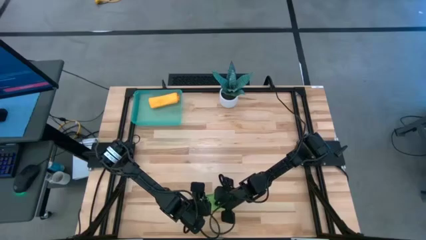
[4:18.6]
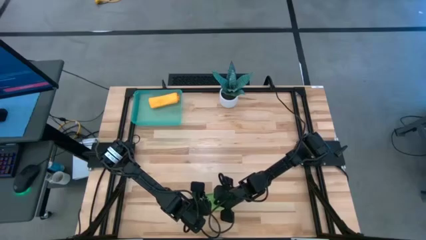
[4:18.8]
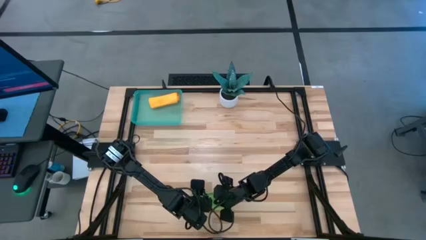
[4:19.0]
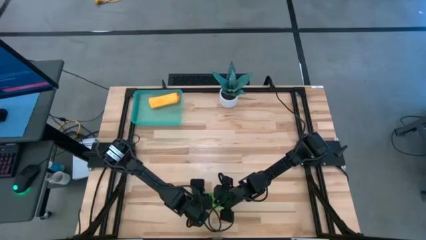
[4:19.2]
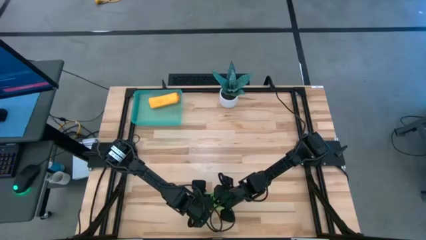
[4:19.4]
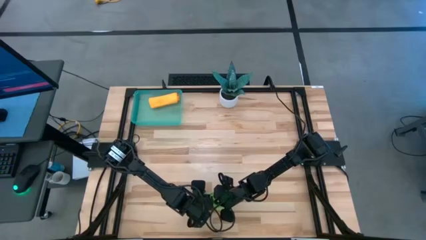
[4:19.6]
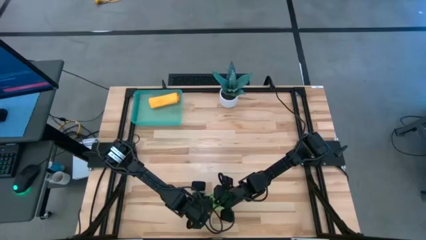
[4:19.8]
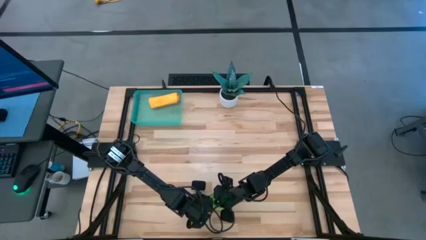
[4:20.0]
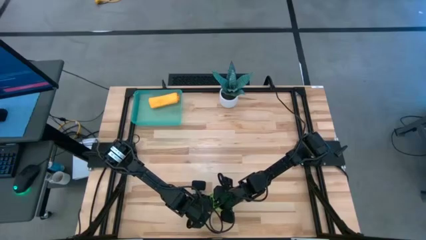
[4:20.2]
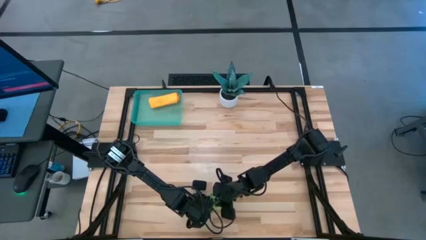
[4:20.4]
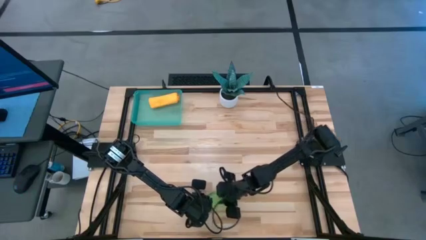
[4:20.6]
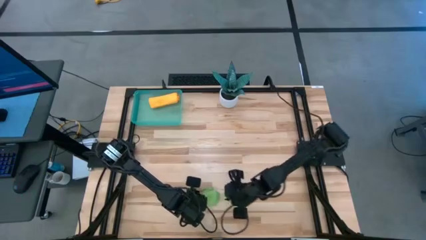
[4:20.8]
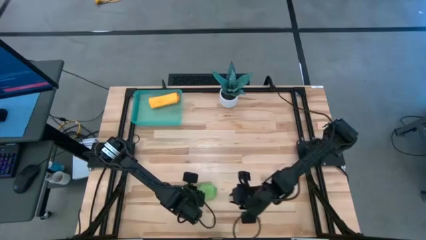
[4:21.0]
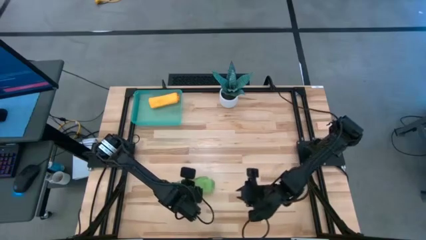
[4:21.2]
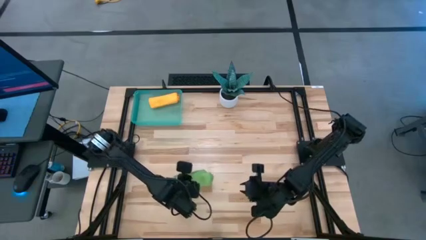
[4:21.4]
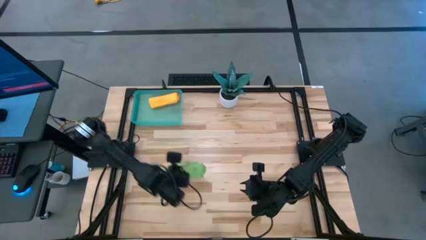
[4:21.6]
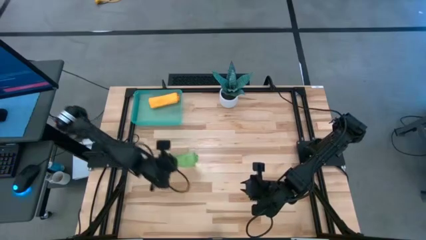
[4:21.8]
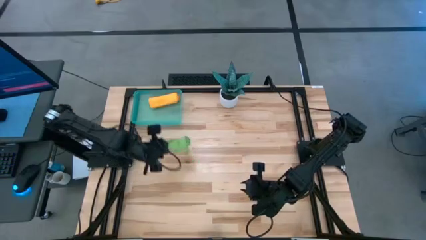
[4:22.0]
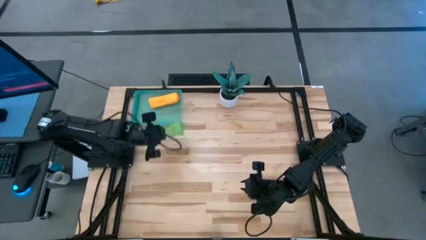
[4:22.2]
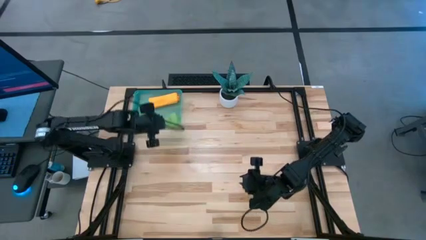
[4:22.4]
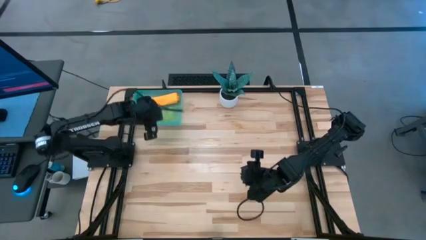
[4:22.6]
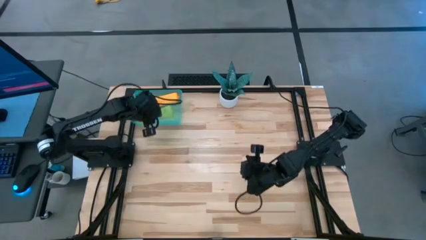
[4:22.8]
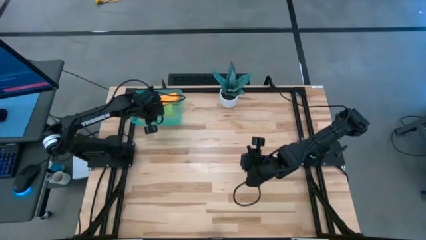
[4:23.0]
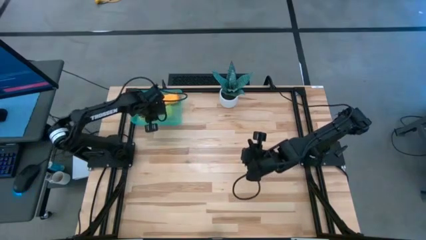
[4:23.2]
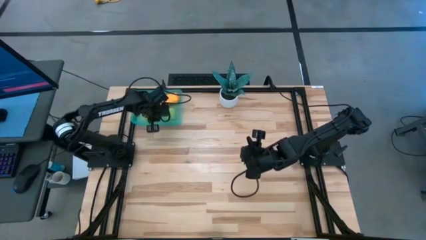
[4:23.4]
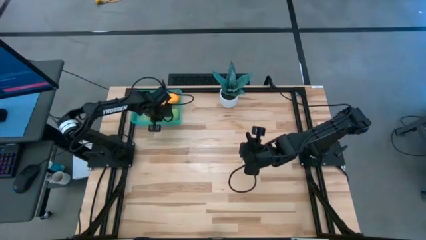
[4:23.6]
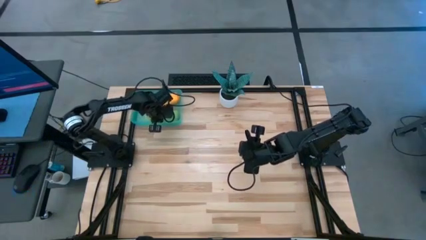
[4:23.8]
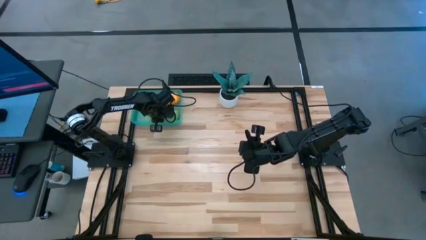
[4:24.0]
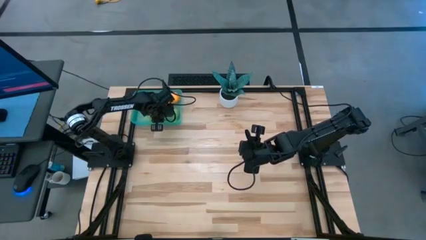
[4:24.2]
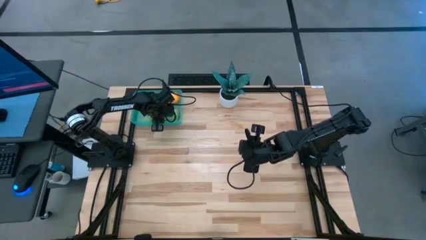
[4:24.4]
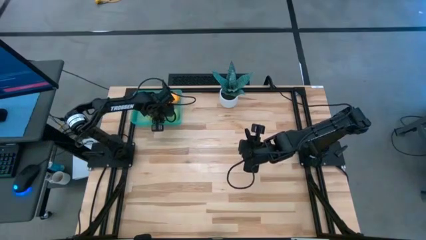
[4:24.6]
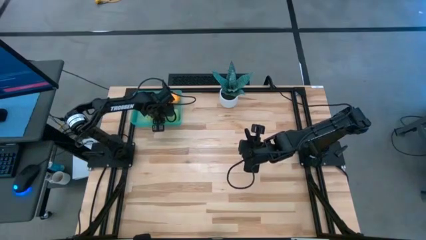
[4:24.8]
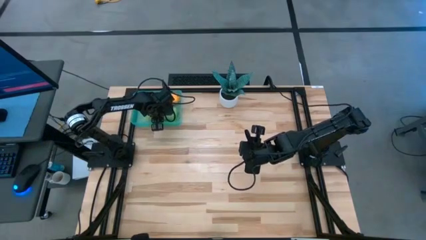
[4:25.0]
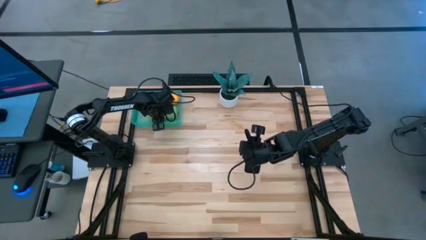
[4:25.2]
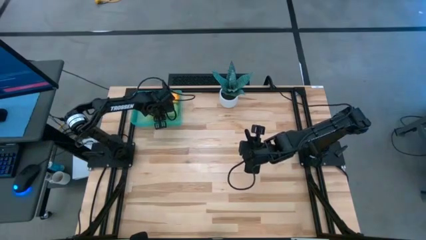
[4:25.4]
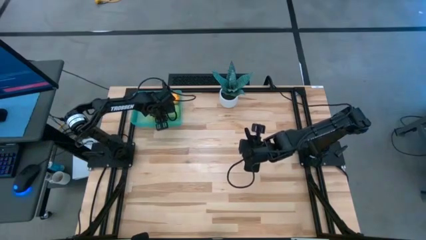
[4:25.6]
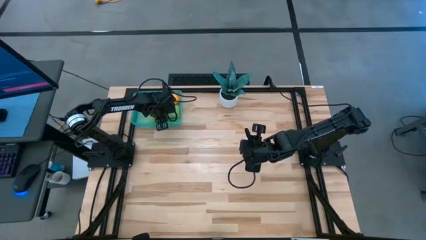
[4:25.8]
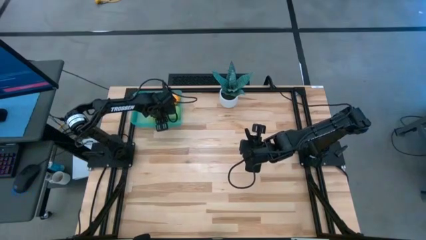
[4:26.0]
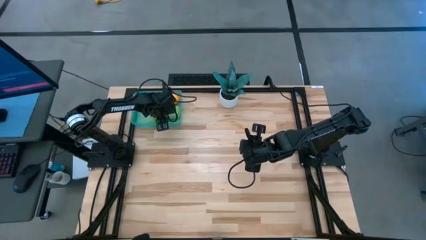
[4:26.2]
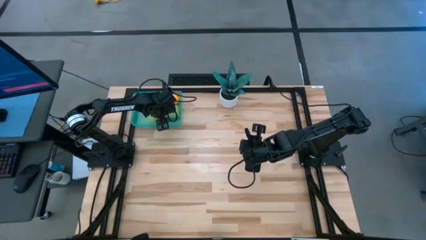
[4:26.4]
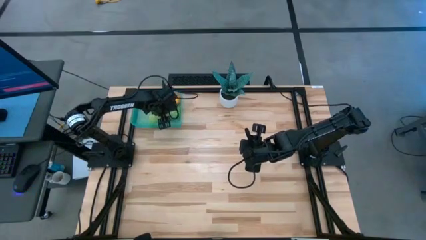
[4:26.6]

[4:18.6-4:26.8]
Task: Roll microfiber towels into tight, uniform cylinder then place into a basket
Put the light green microfiber cloth into transparent light green

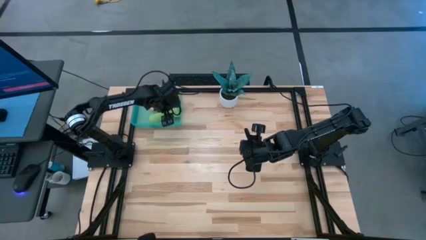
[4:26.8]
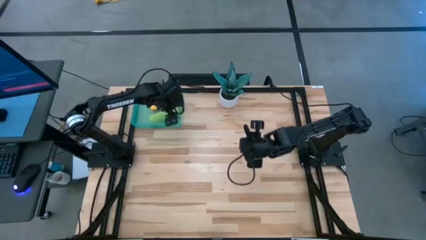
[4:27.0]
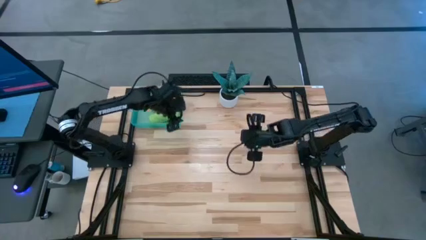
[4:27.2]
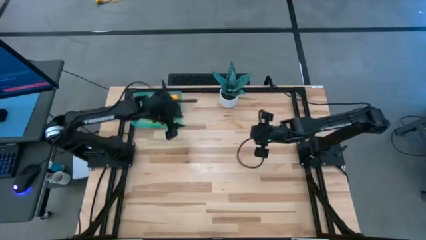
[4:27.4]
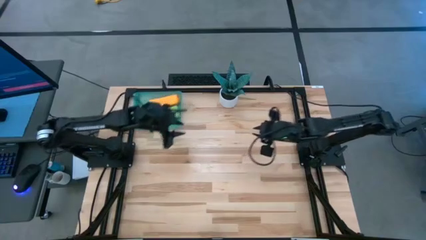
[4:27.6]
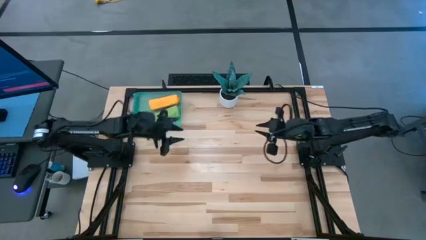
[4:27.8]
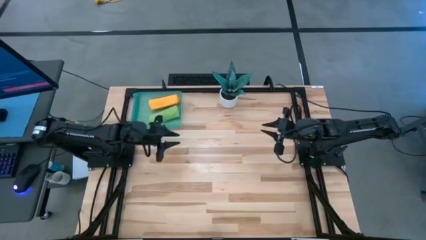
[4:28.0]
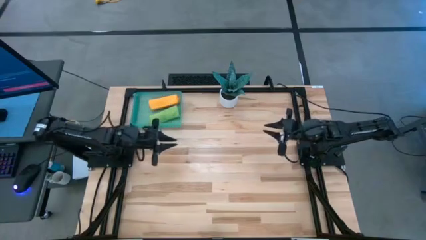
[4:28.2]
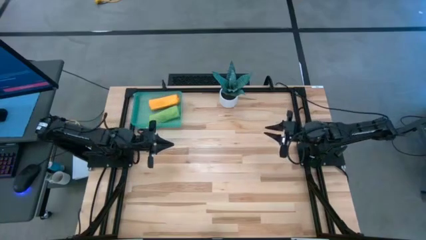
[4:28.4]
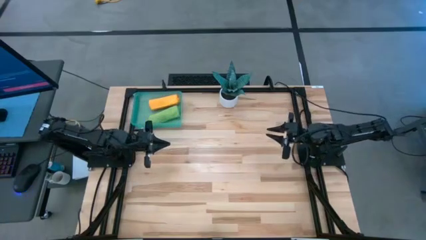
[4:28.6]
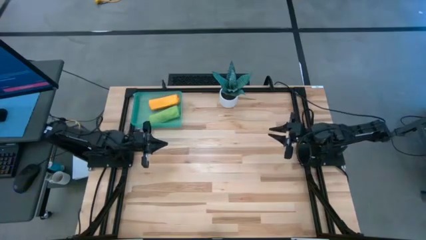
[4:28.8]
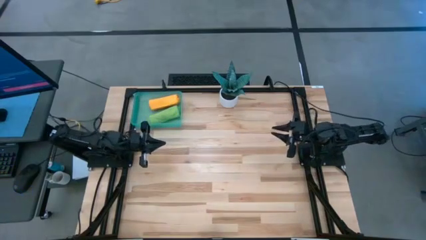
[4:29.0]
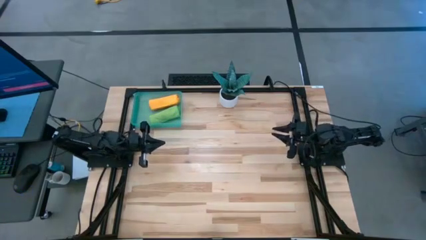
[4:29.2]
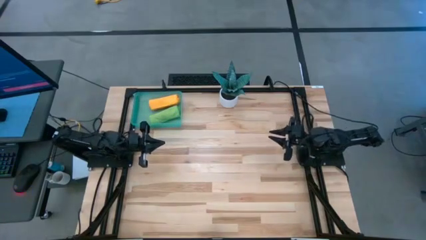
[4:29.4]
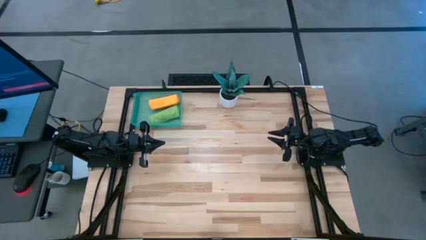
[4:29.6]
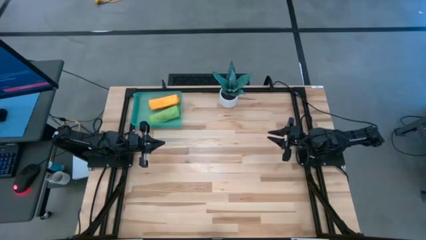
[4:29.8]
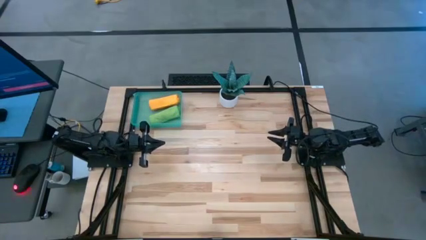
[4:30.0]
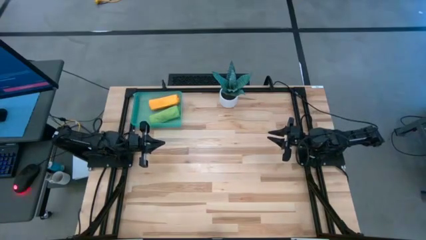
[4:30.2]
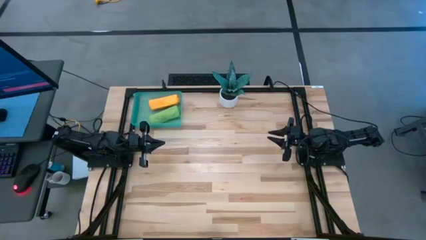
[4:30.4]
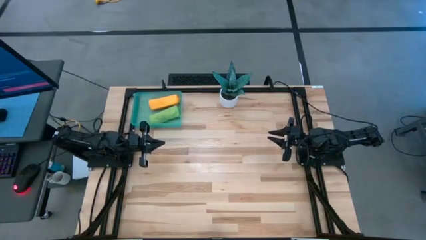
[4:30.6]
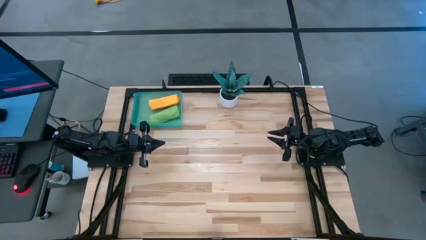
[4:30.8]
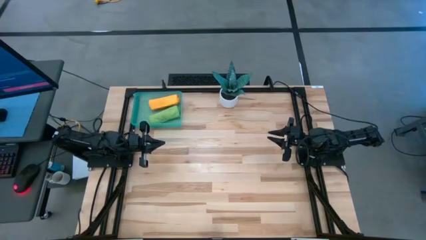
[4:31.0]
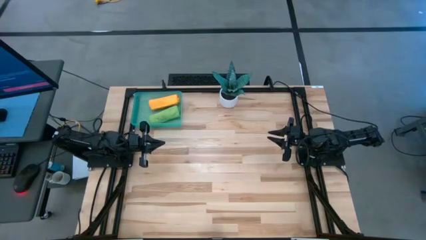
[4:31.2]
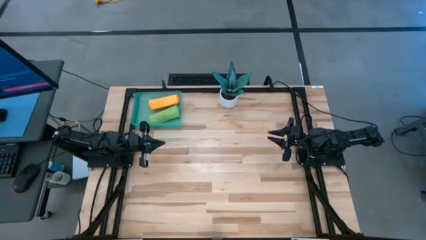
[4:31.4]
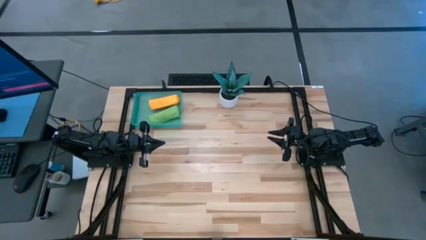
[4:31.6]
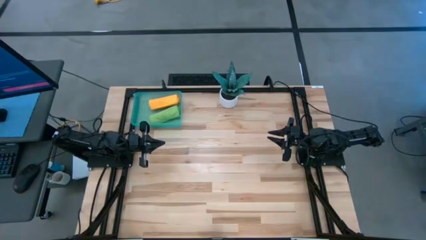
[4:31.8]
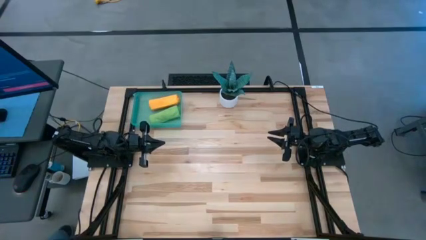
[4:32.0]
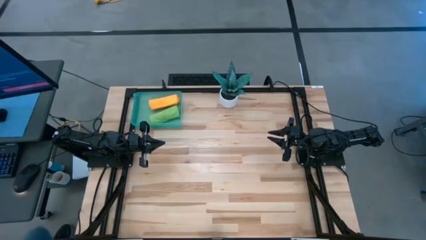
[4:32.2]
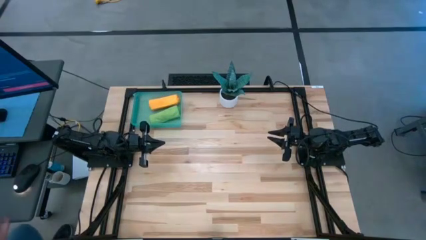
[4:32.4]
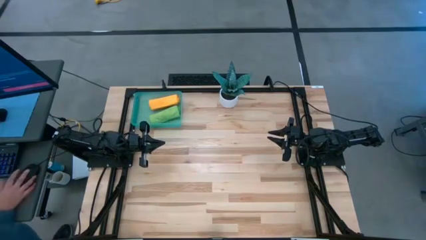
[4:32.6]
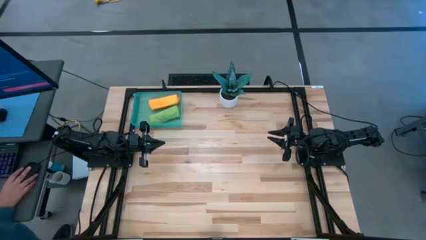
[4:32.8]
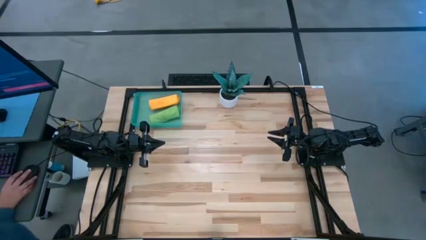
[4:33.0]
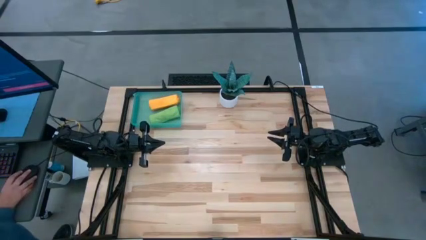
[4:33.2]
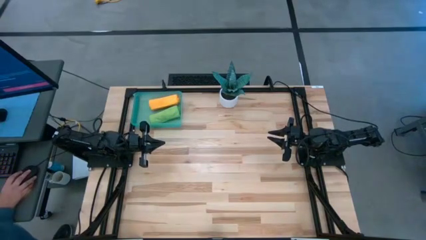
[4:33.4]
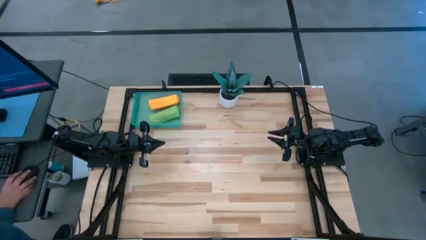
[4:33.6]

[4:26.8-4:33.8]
Return to Home Position

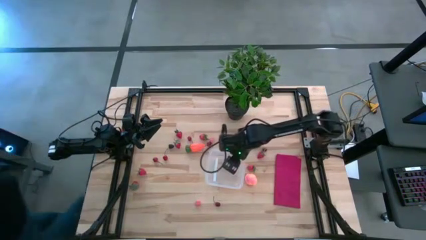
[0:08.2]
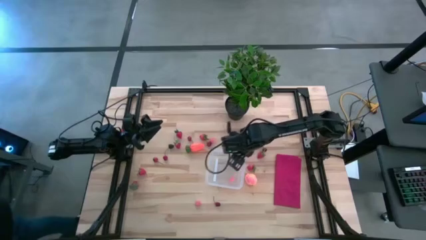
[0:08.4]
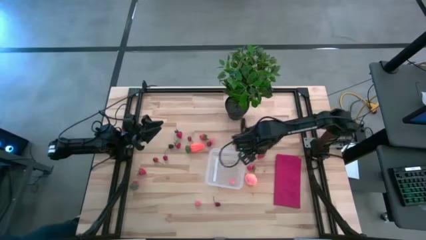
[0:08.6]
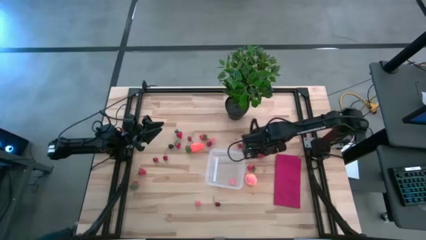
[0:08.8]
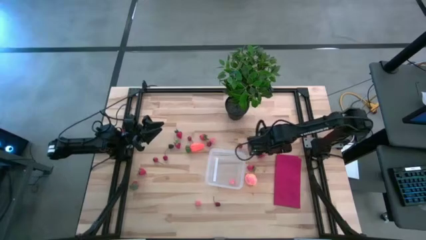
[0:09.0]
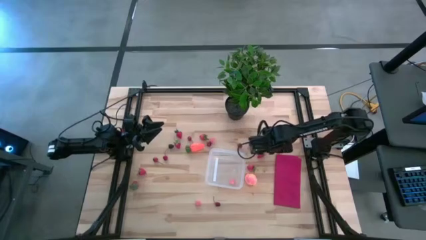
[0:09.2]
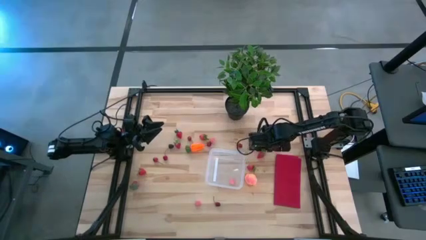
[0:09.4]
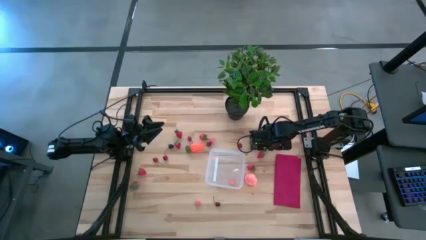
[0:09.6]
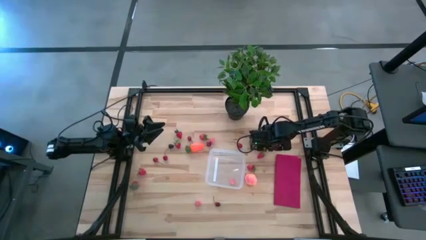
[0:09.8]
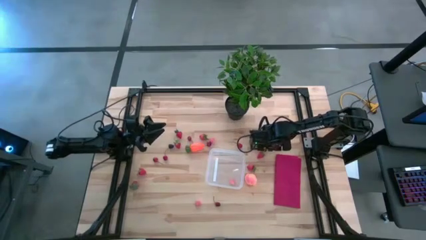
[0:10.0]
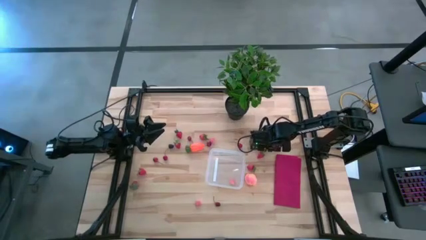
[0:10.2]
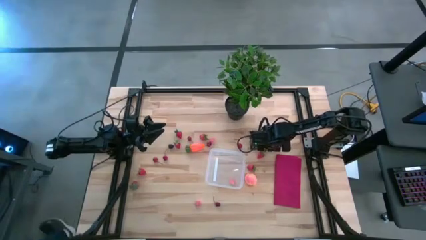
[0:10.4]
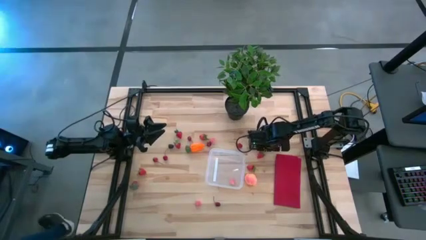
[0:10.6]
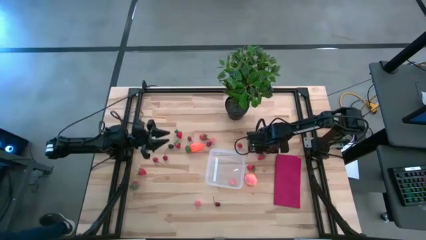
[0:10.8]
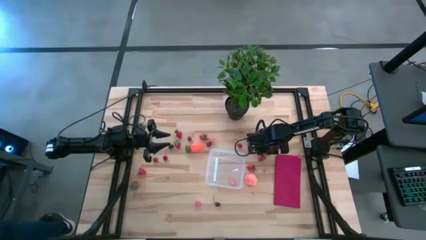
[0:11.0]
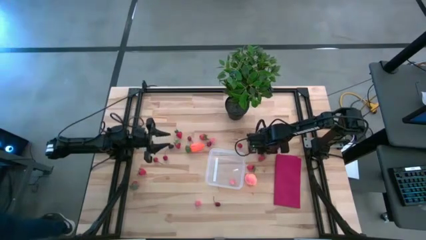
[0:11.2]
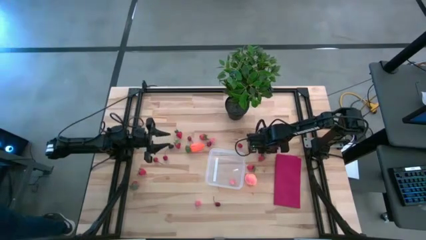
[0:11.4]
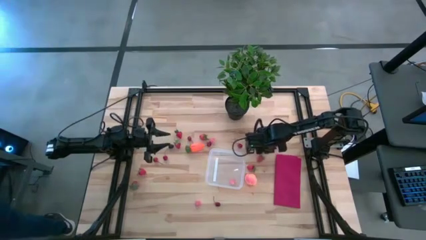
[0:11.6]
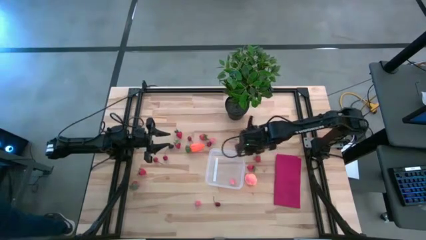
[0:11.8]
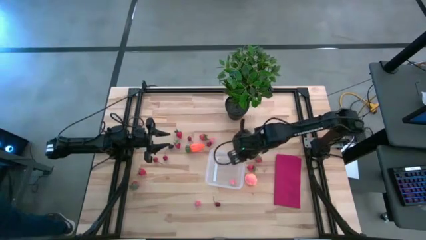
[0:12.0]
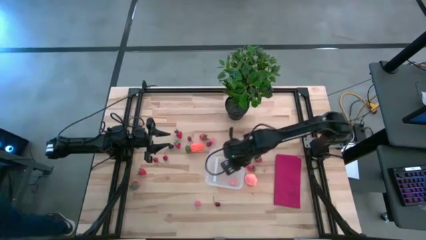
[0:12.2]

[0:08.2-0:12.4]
Task: Pick and placing Produce into tupperware
Put the red cherry into the transparent bin
